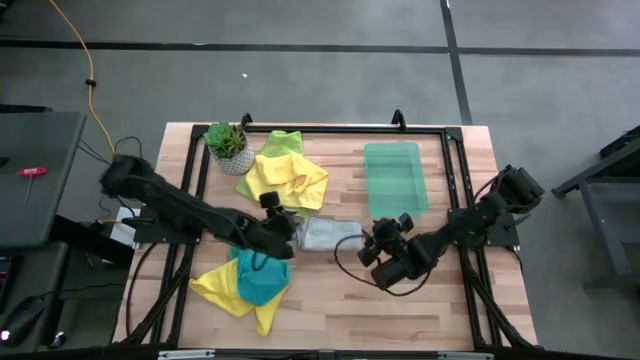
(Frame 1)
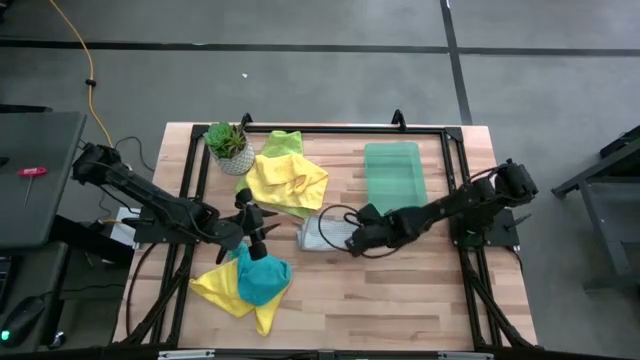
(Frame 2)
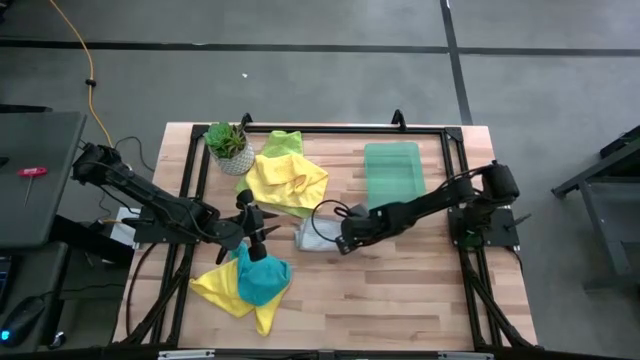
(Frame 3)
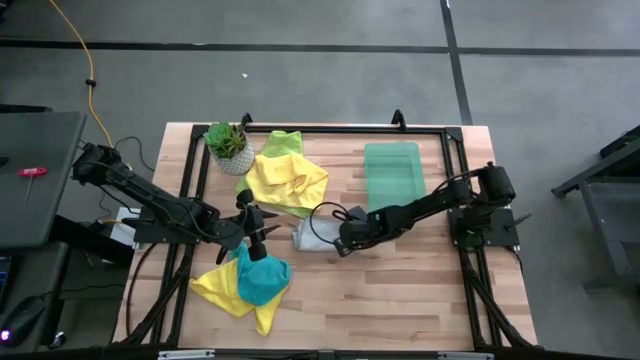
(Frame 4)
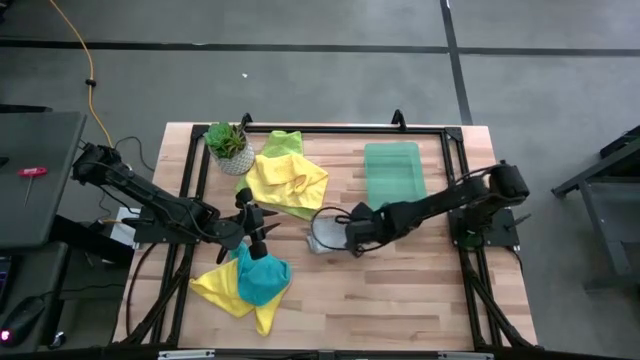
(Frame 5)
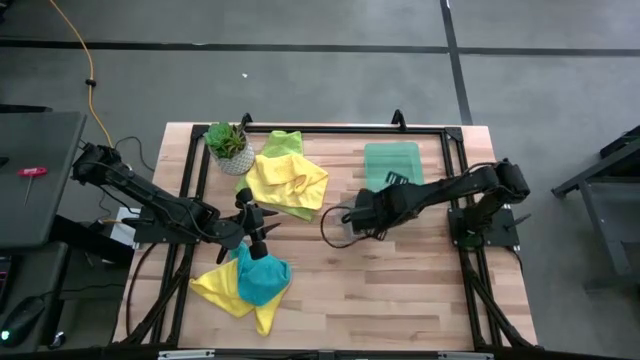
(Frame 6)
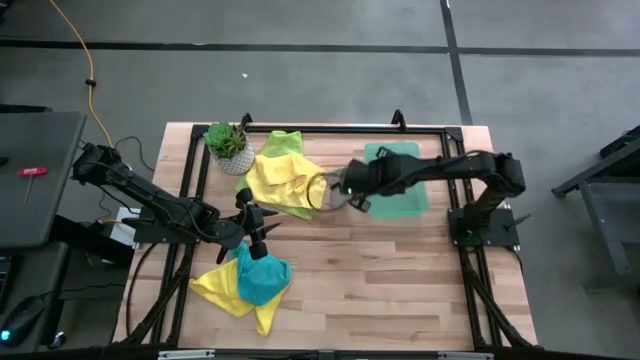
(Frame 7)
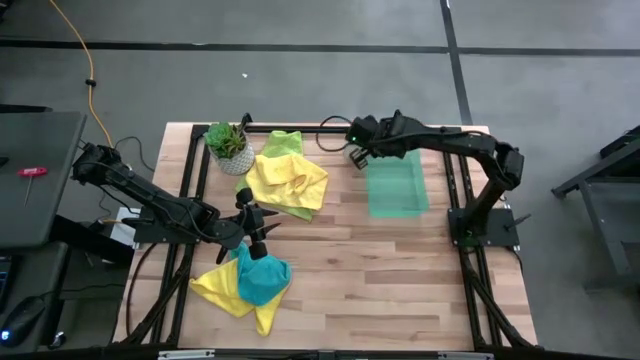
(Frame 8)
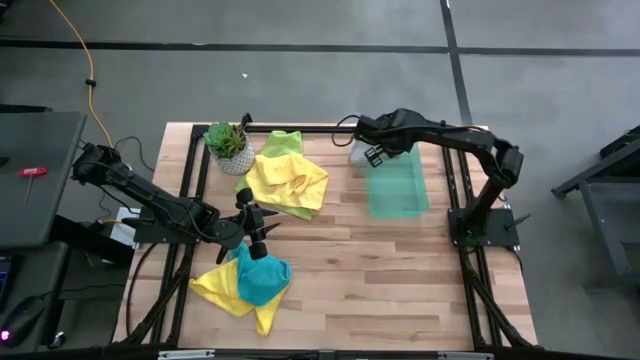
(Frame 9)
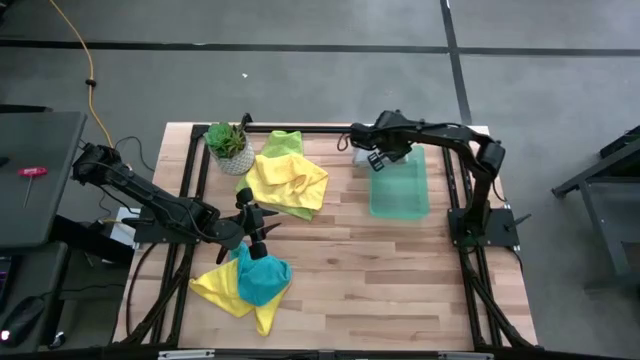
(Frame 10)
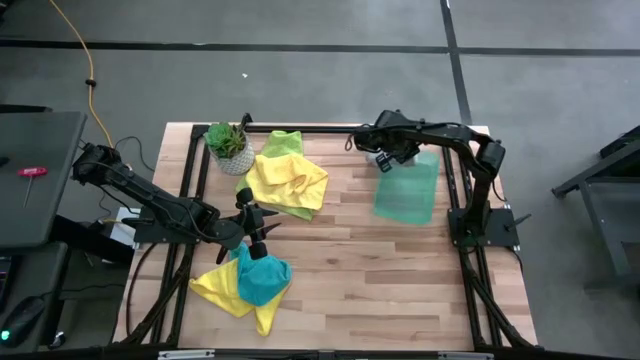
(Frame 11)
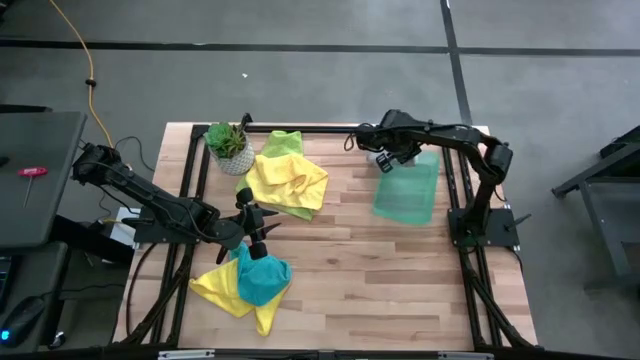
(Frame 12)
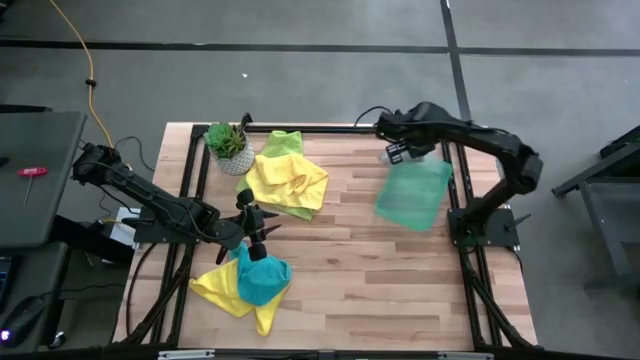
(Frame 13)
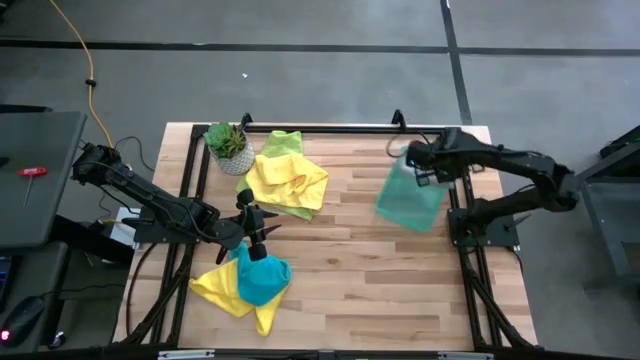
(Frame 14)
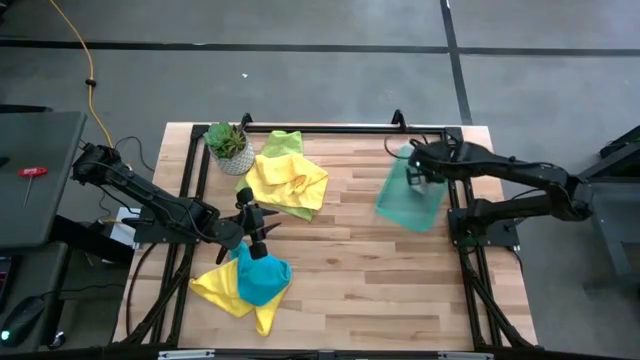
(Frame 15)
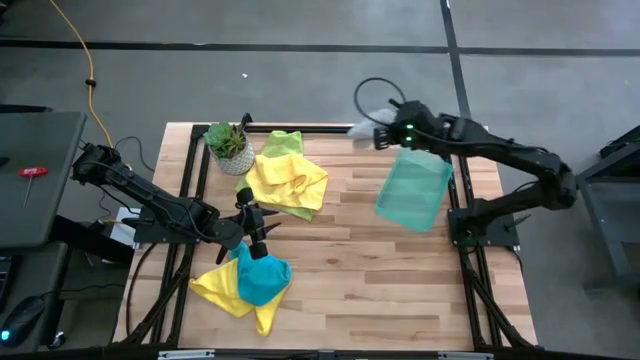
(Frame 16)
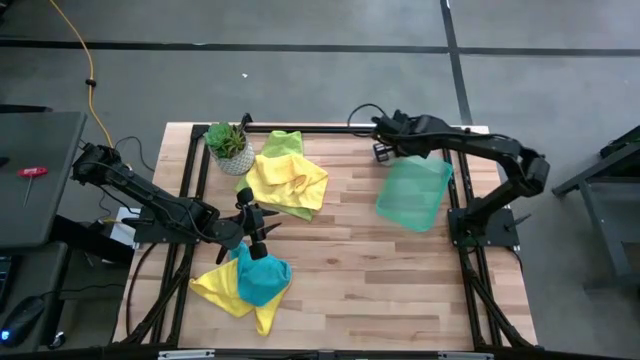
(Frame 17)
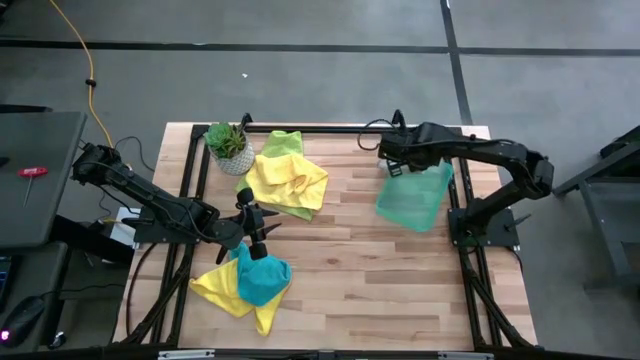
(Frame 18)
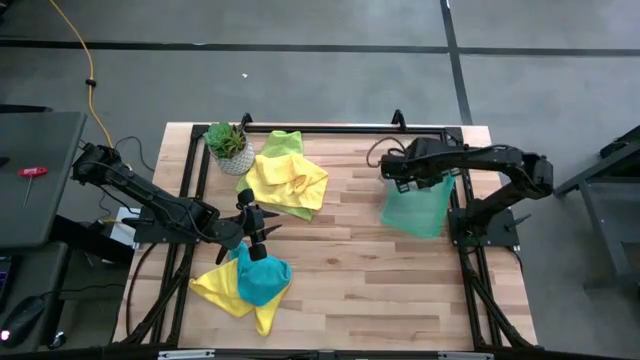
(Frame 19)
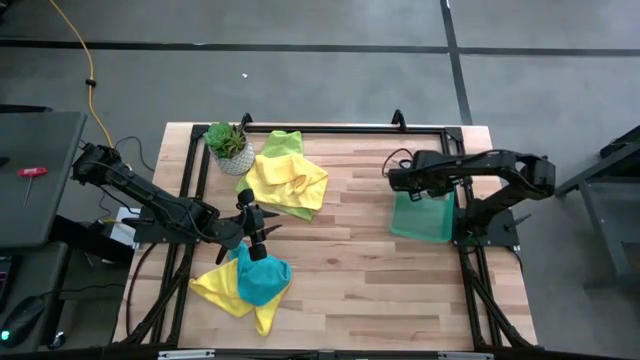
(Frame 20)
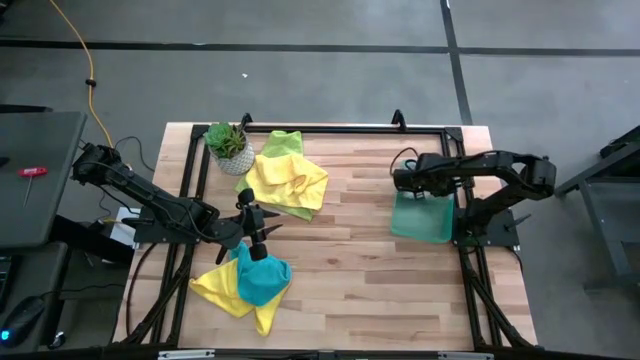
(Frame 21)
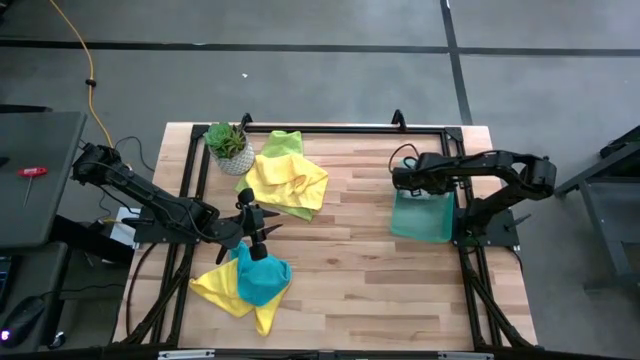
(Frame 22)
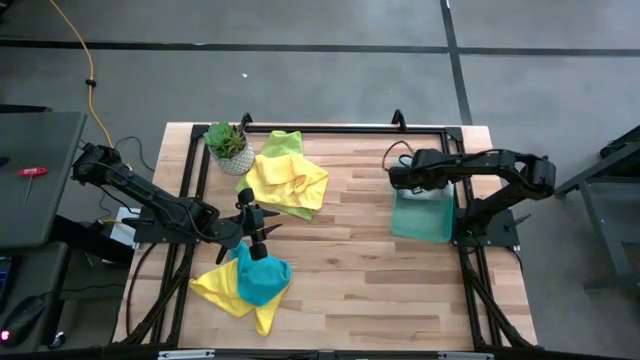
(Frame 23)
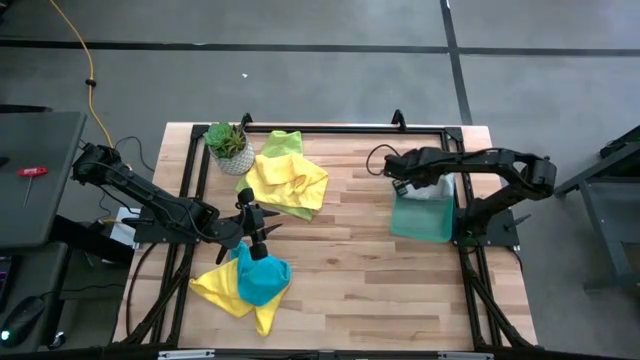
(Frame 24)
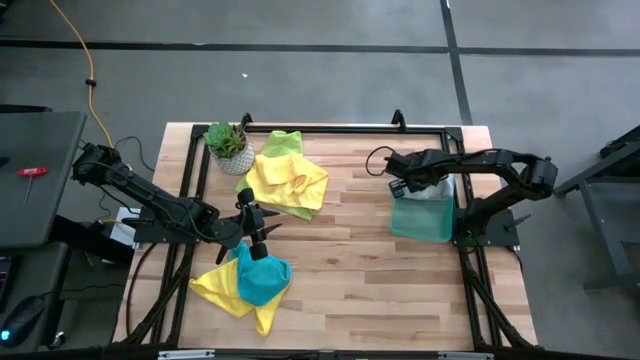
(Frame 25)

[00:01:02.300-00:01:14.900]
Task: Fold microfiber towels
Put the gray microfiber cloth into the blue bin

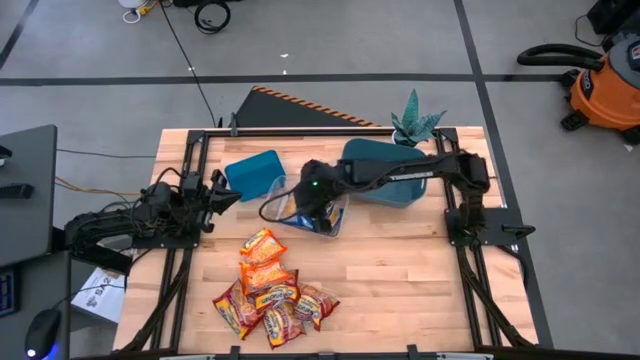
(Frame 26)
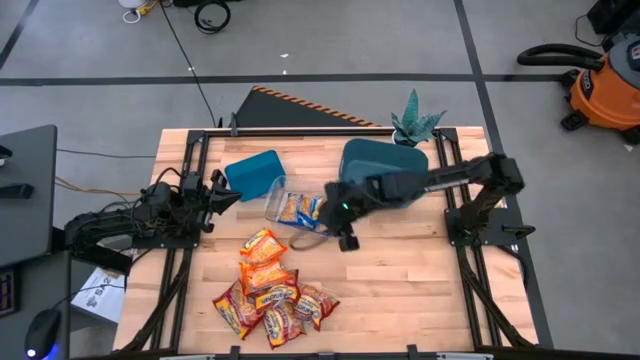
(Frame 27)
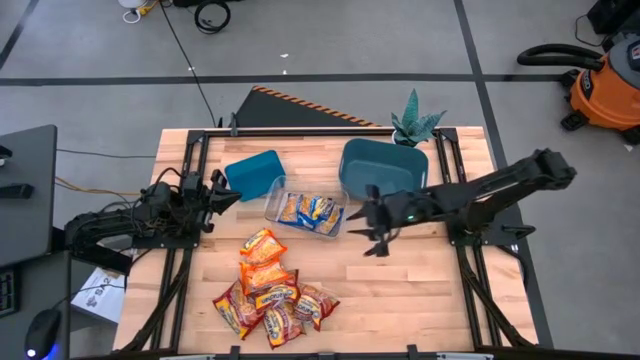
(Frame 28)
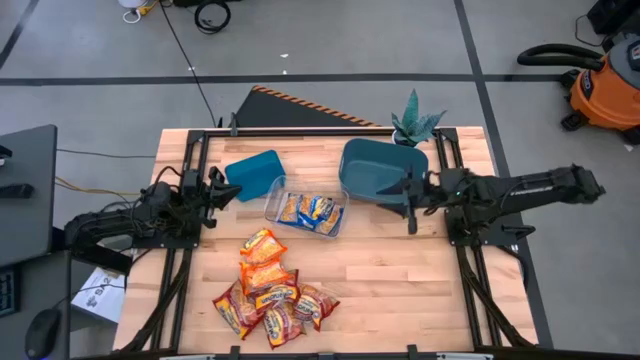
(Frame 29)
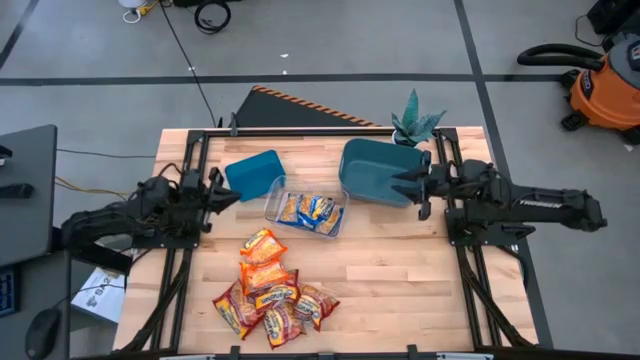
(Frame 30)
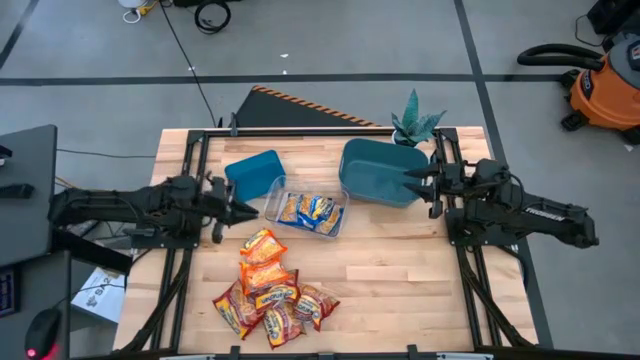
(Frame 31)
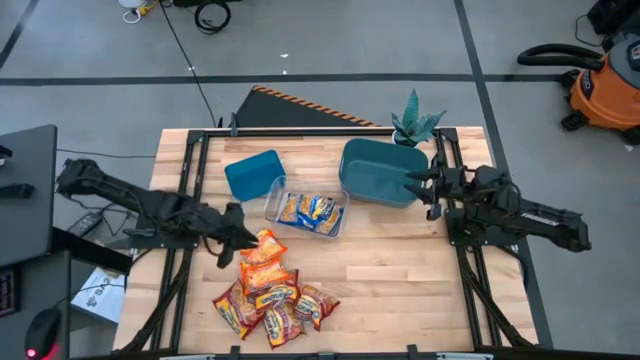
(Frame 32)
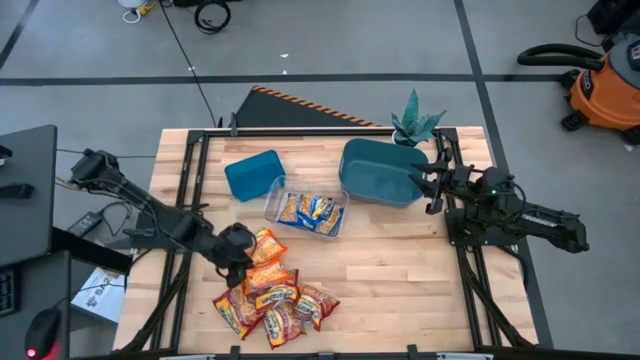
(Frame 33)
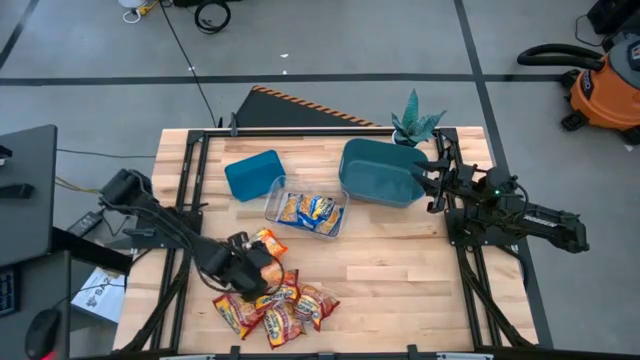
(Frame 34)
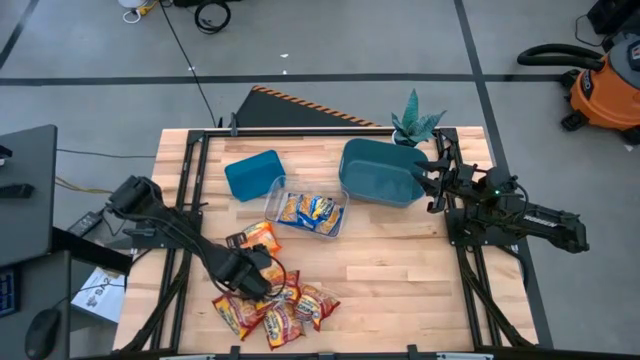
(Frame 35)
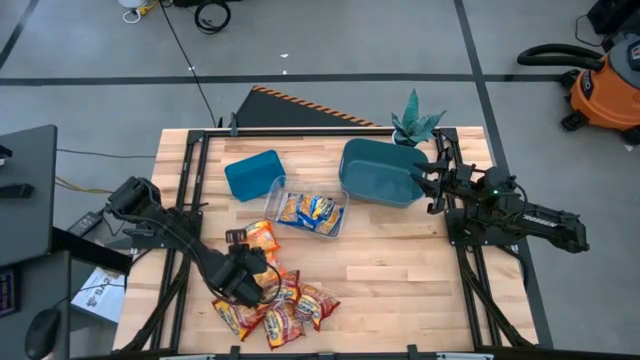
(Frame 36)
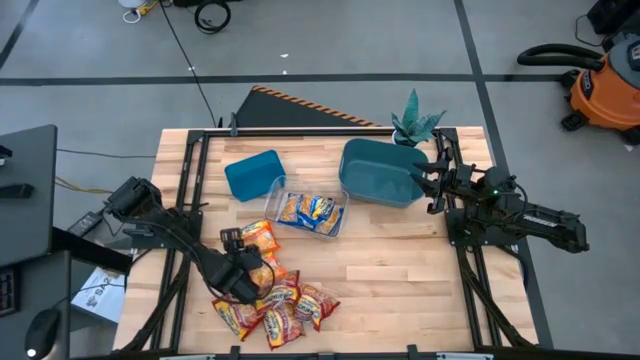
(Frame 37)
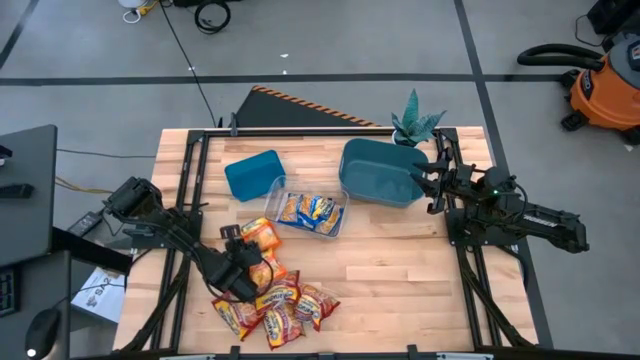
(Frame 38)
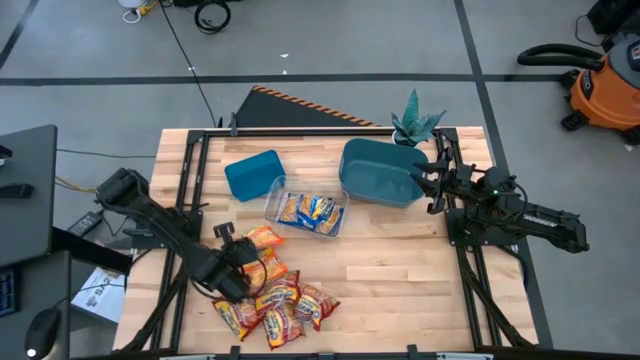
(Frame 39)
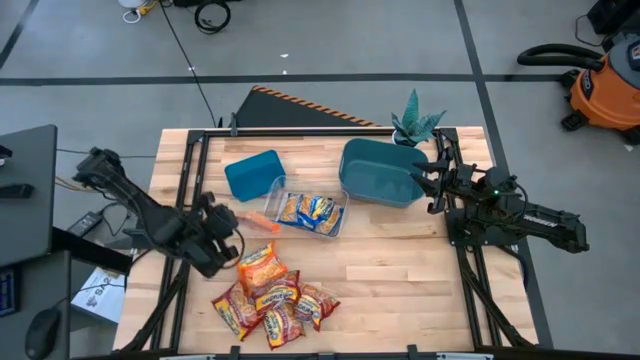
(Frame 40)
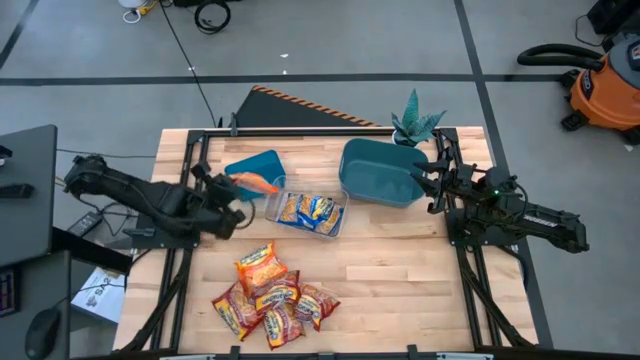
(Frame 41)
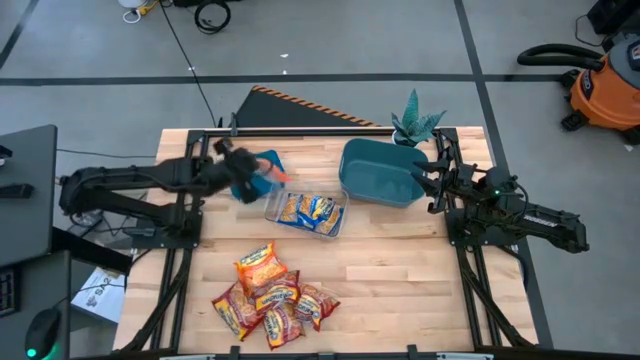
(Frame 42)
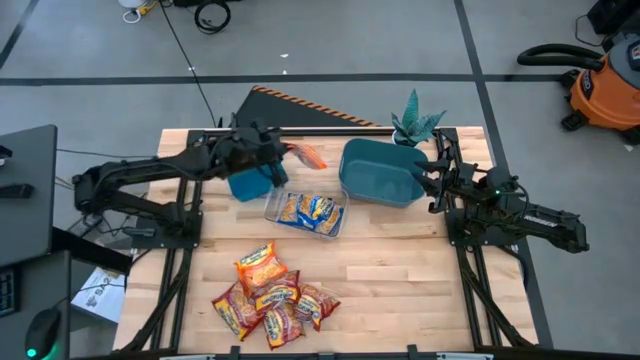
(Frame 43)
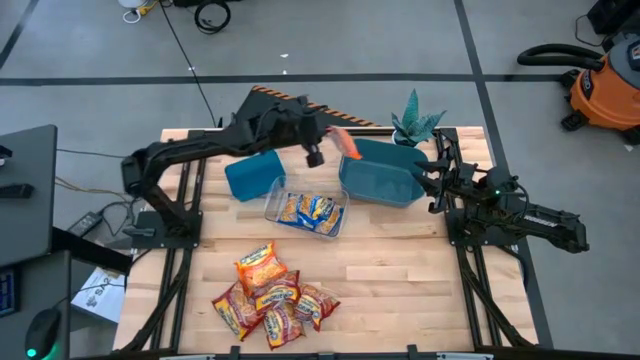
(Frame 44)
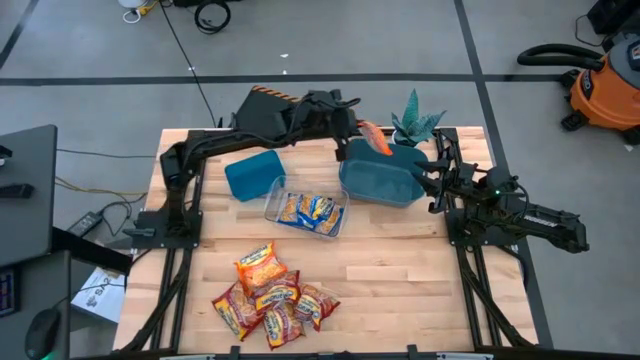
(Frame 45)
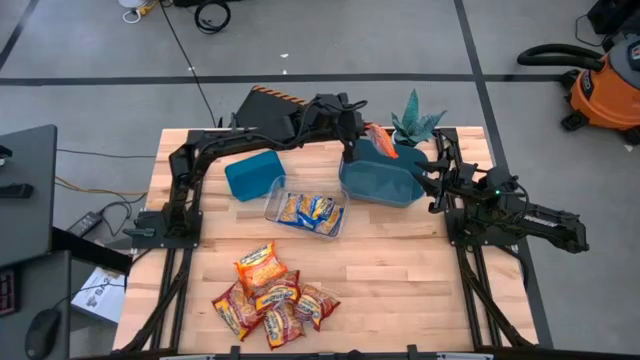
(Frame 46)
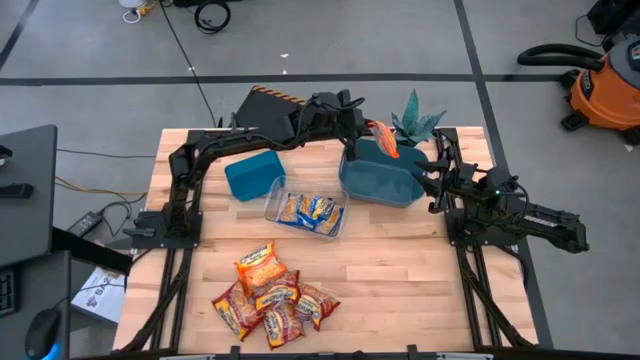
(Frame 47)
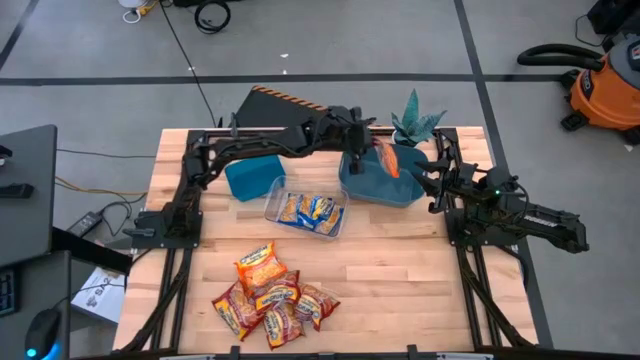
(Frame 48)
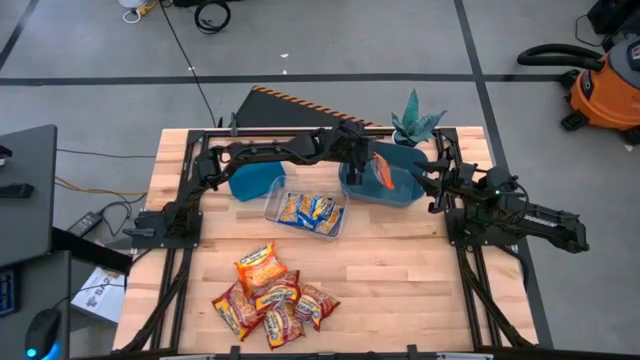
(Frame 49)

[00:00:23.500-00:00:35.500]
Task: Sort Maruchan noodles
Put the orange noodle pack into the right large dark blue bin
